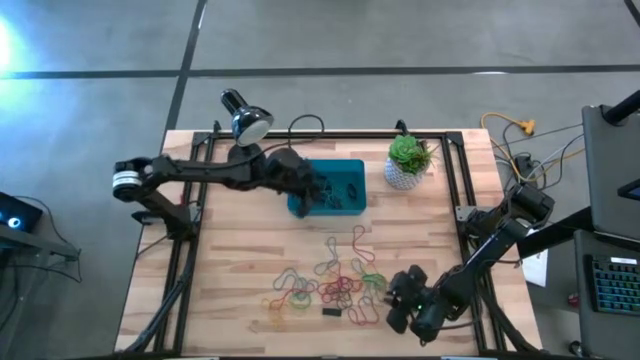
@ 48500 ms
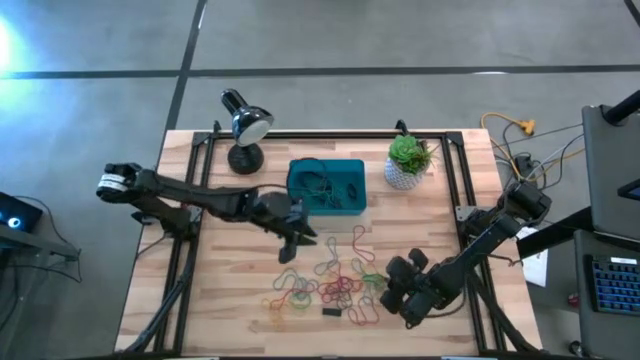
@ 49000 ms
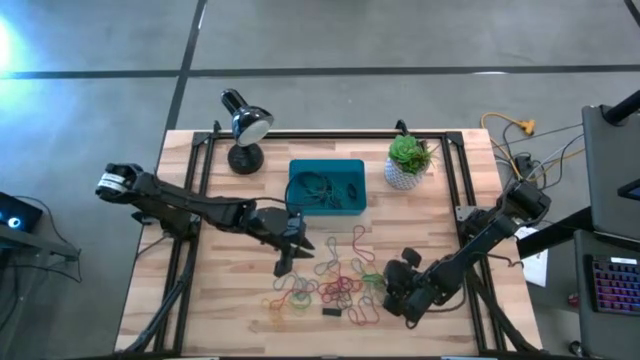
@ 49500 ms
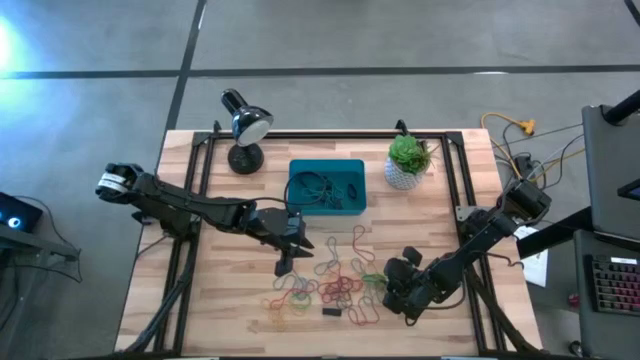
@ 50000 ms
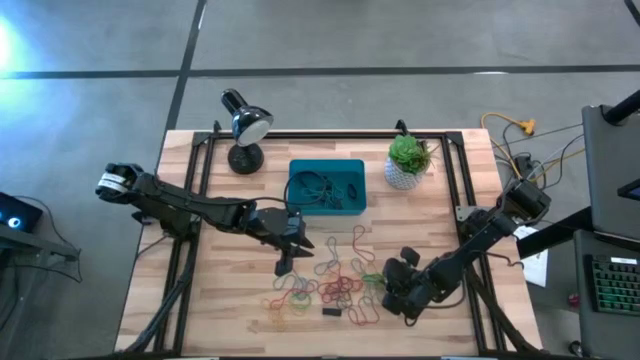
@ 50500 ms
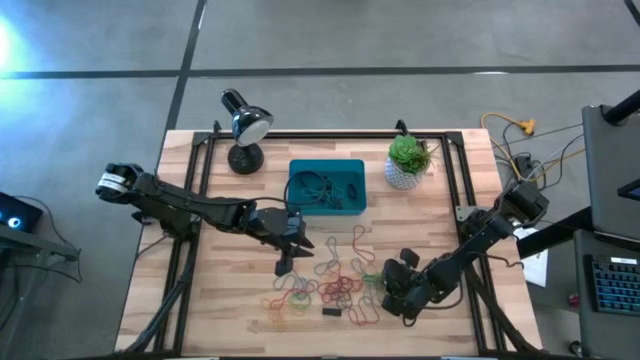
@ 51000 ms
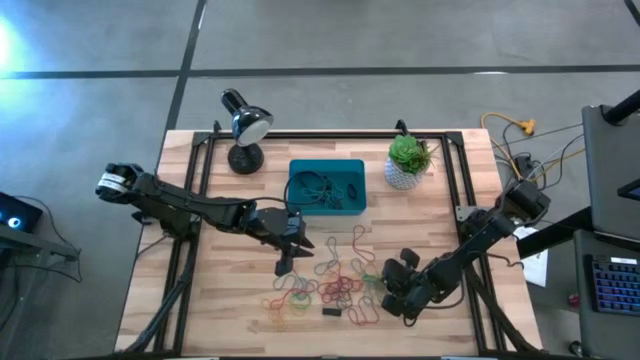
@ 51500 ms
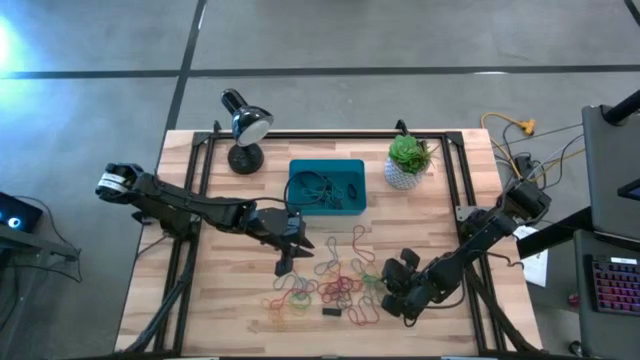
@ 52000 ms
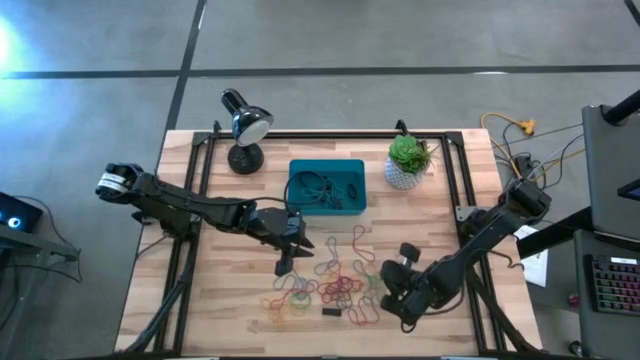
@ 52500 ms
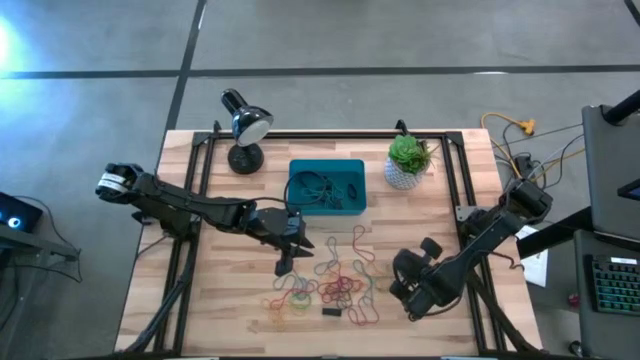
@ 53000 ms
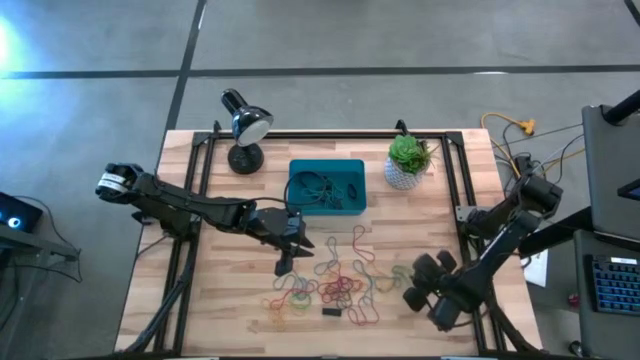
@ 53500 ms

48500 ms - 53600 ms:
Task: Pick and place rubber bands into bin
Put the left green rubber band into the dark blue bin

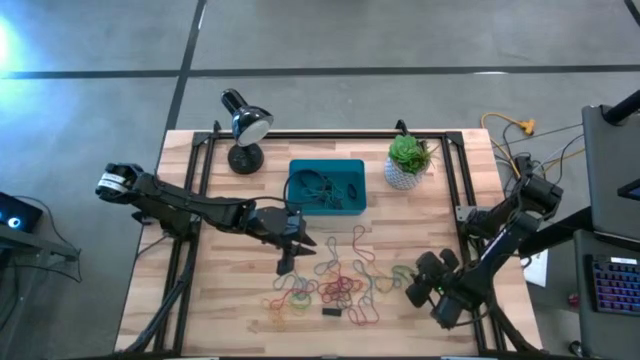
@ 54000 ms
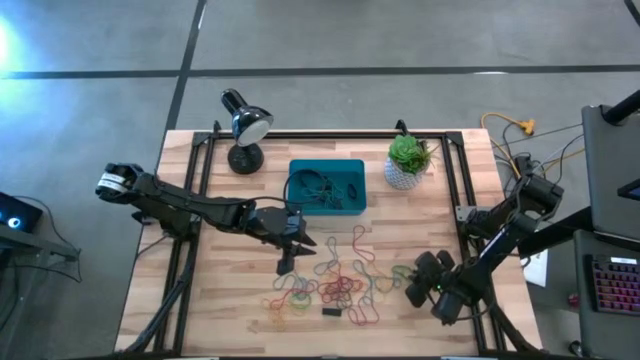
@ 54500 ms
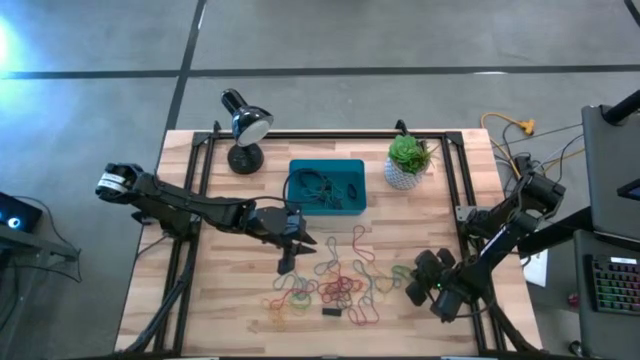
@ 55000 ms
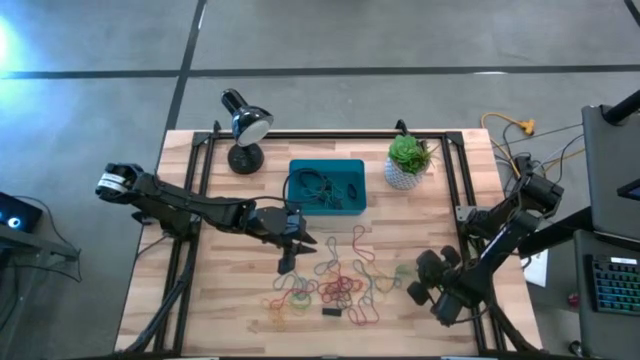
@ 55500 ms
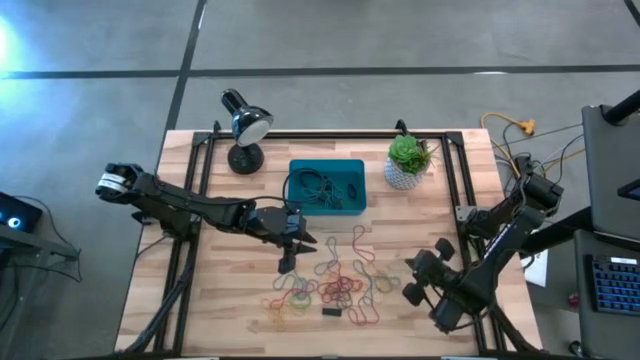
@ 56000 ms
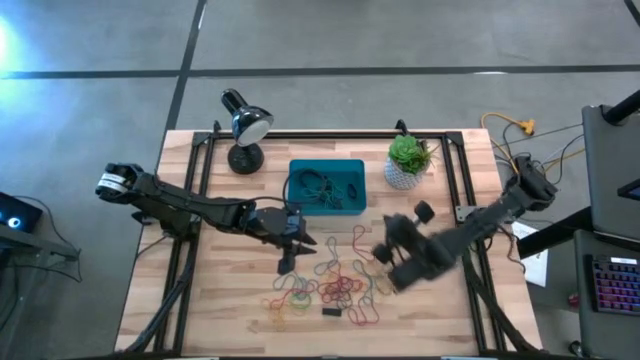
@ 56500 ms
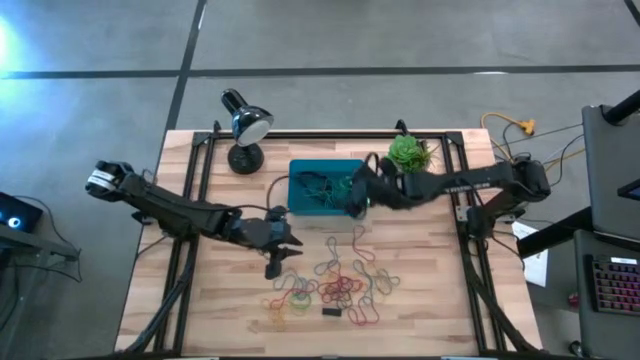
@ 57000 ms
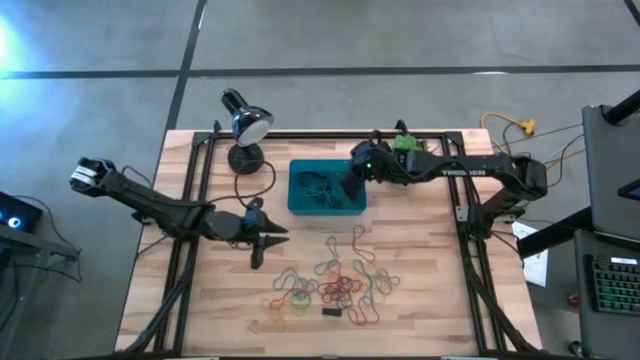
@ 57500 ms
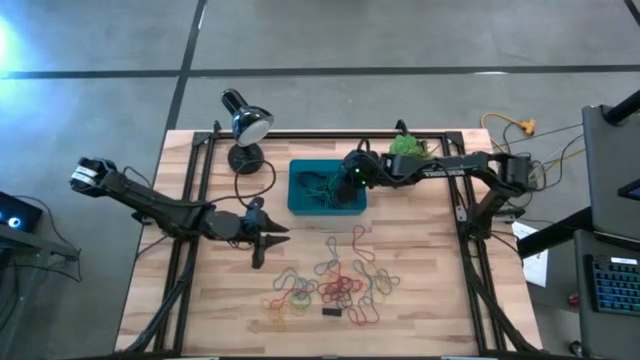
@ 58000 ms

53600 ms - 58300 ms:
Put the green rubber band into the dark blue bin

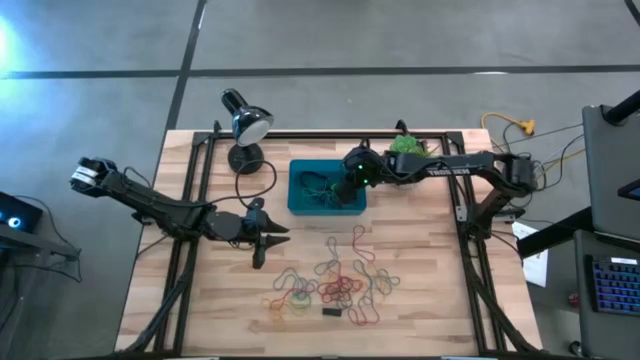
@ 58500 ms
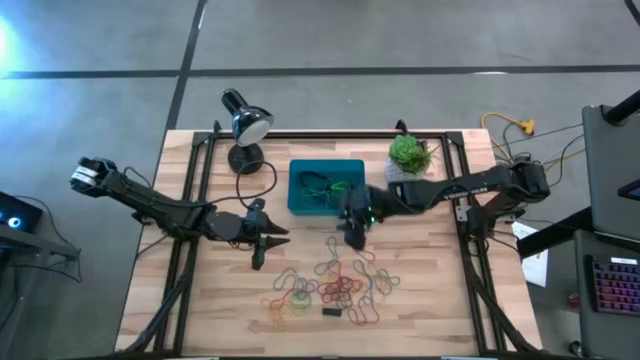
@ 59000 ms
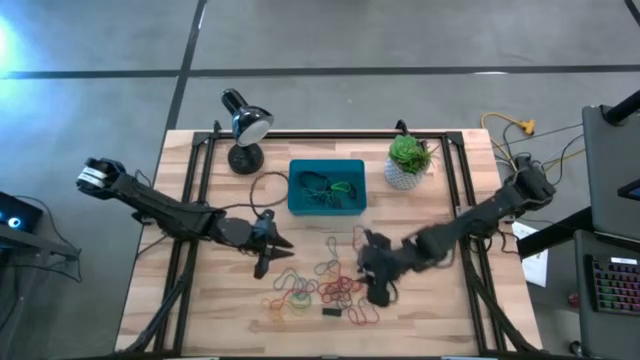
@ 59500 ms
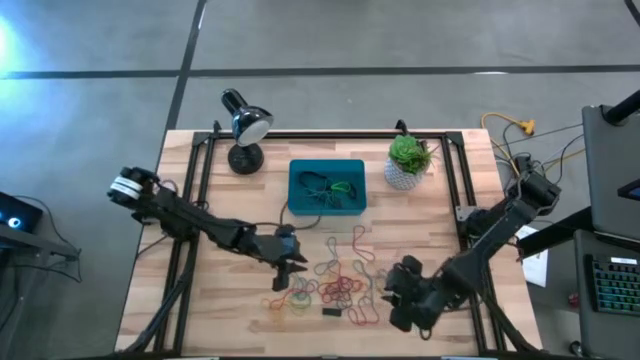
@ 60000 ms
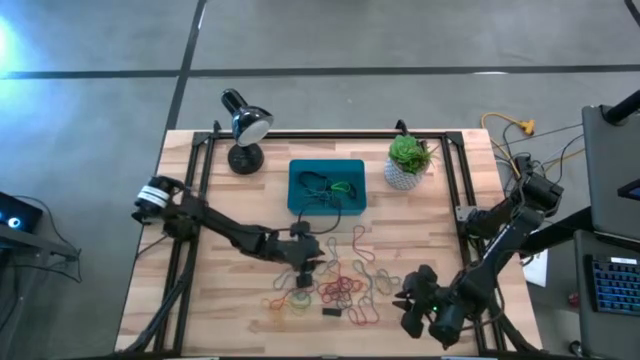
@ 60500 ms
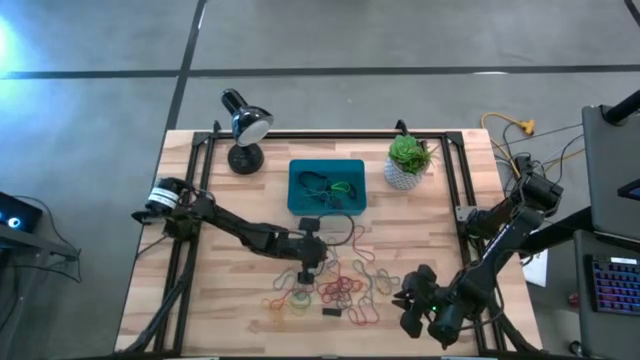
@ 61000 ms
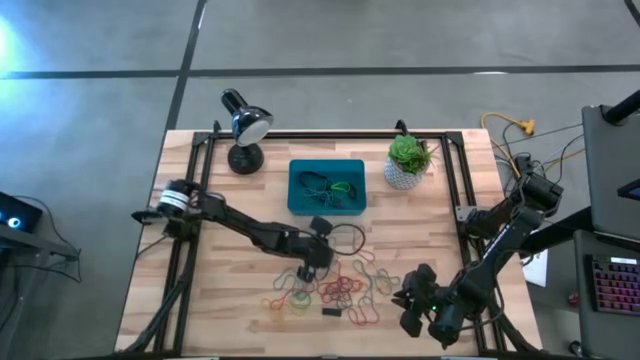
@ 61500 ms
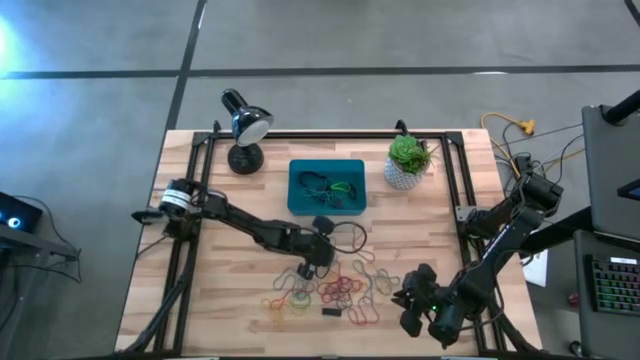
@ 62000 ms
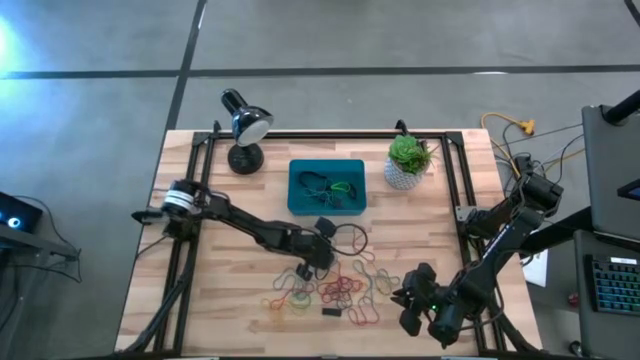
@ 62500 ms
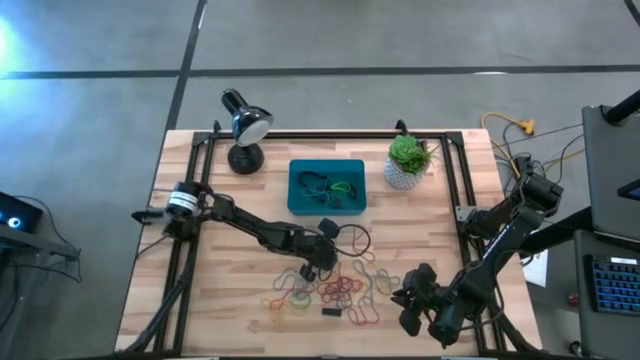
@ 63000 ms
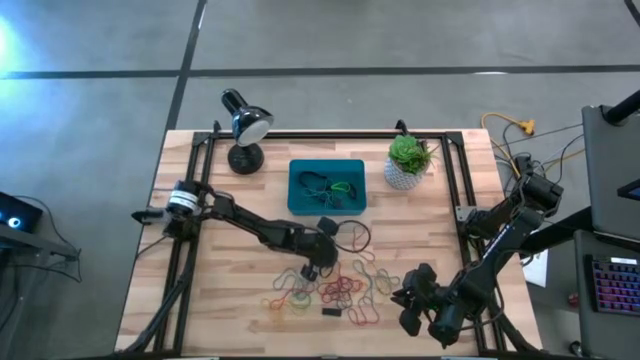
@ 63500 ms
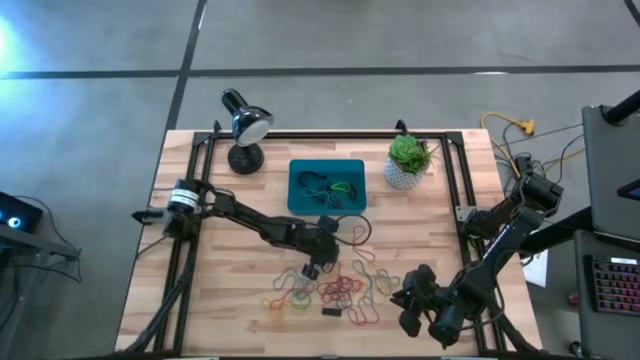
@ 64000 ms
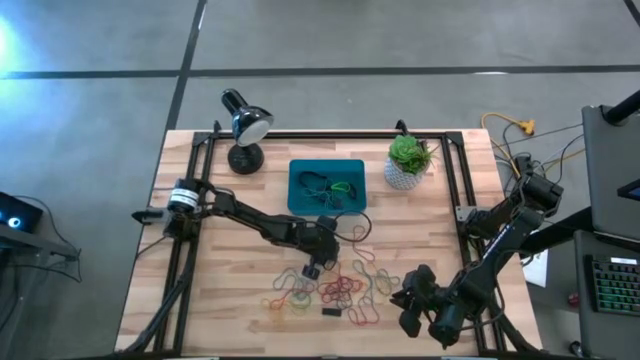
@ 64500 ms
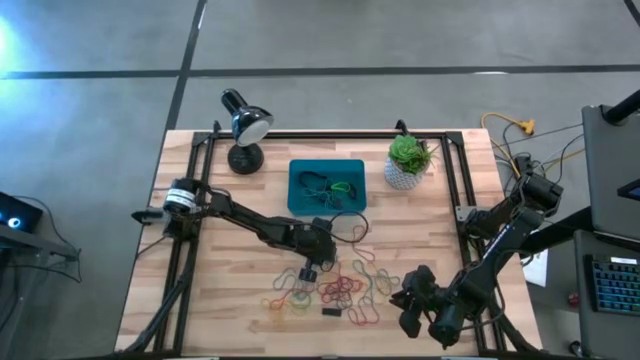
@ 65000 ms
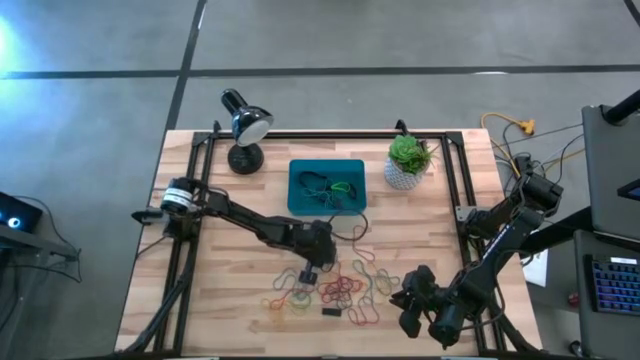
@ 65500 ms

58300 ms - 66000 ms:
Put the blue rubber band into the dark blue bin

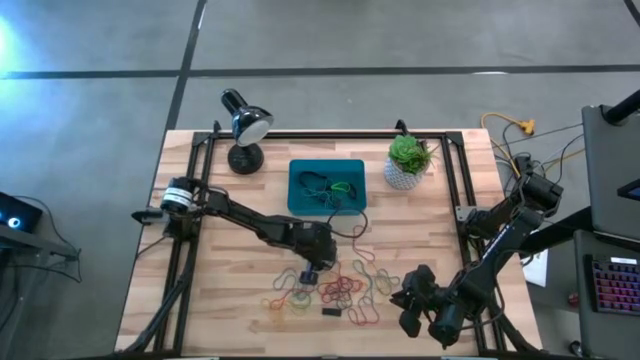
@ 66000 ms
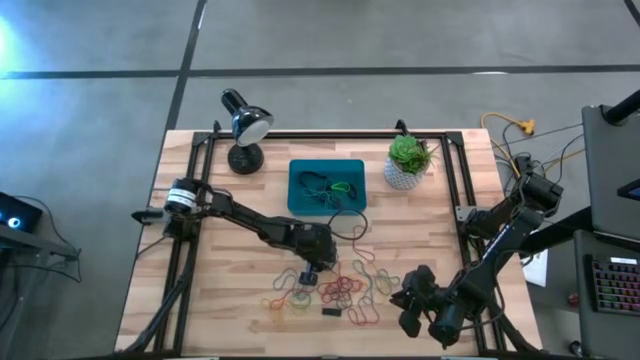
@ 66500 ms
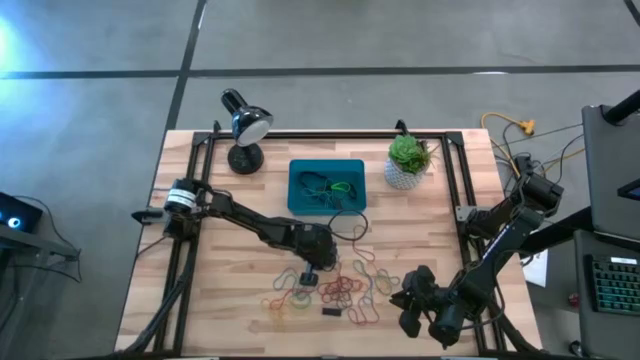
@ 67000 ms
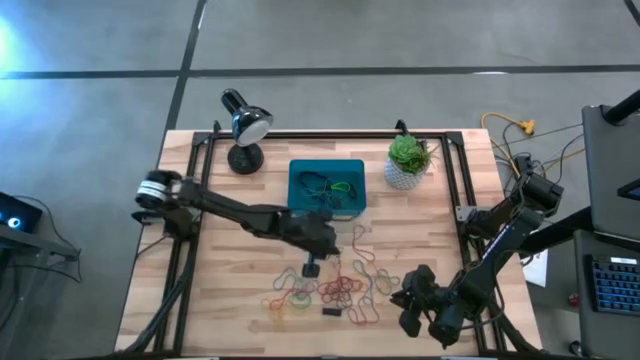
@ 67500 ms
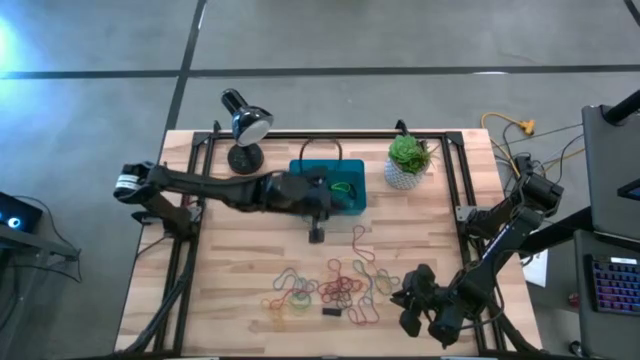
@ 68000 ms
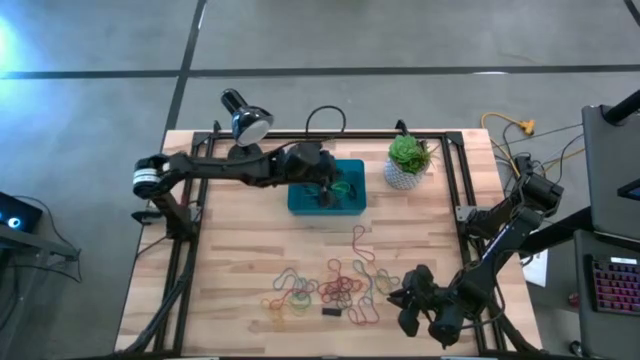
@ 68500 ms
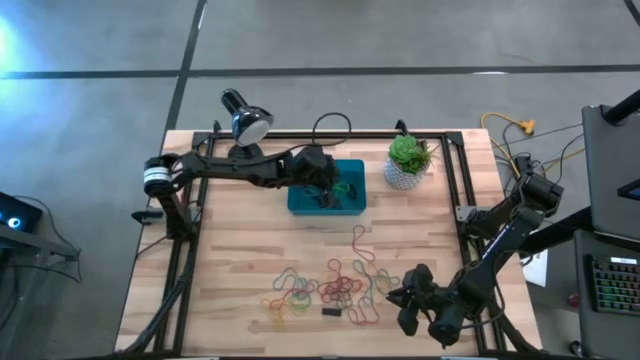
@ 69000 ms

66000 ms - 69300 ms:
Put the blue rubber band into the blue transparent bin
